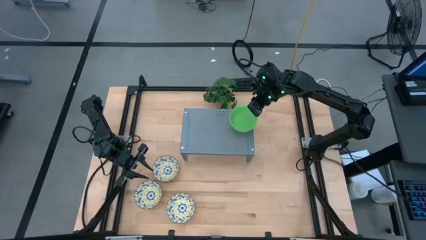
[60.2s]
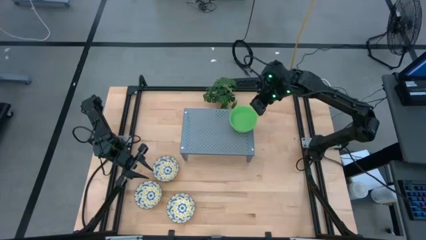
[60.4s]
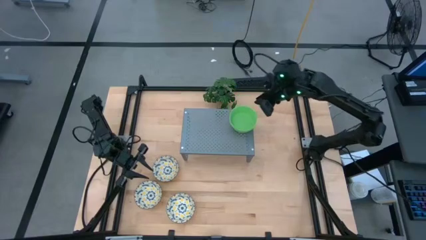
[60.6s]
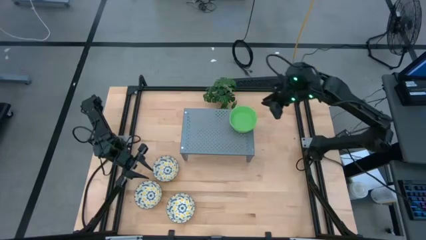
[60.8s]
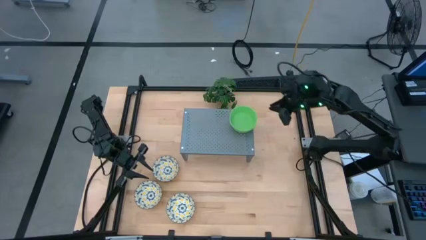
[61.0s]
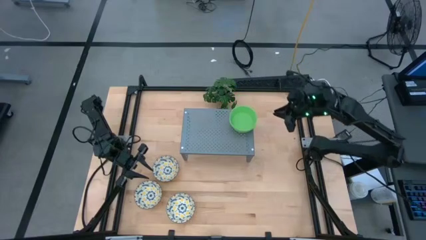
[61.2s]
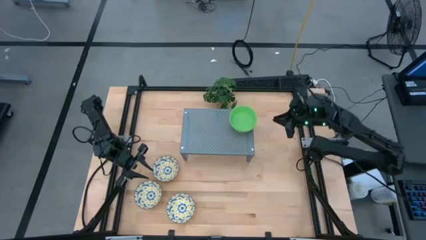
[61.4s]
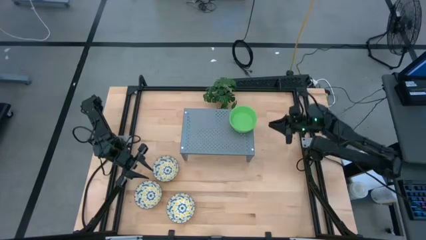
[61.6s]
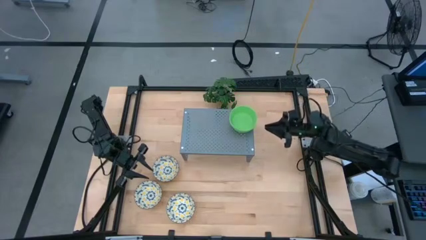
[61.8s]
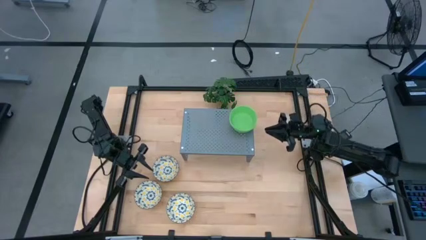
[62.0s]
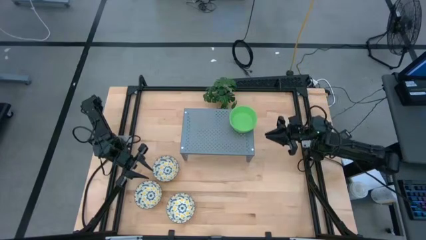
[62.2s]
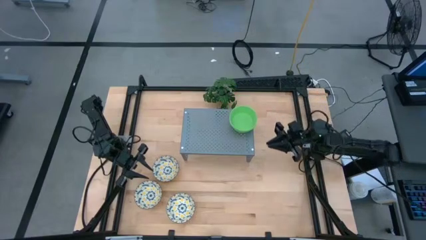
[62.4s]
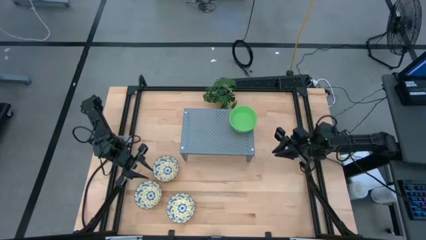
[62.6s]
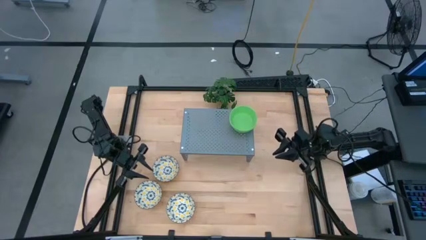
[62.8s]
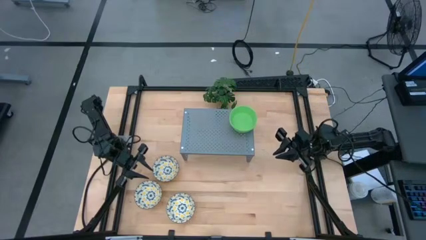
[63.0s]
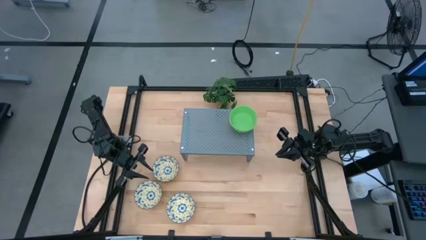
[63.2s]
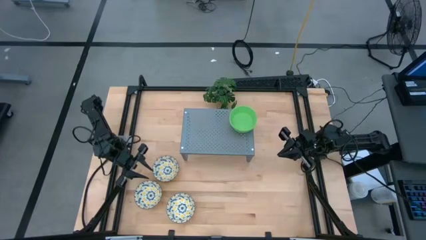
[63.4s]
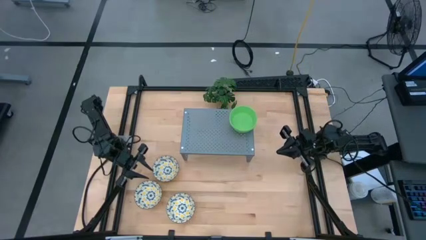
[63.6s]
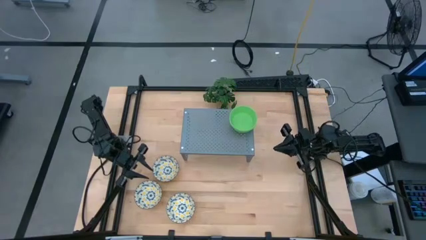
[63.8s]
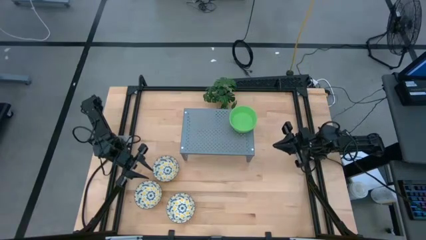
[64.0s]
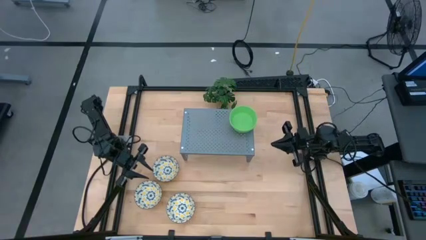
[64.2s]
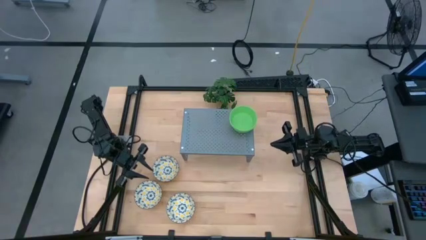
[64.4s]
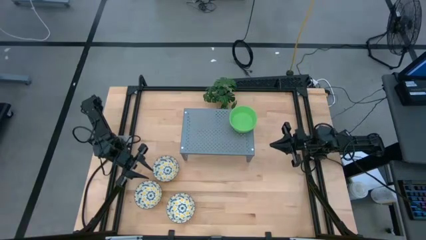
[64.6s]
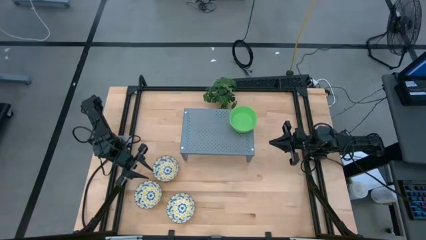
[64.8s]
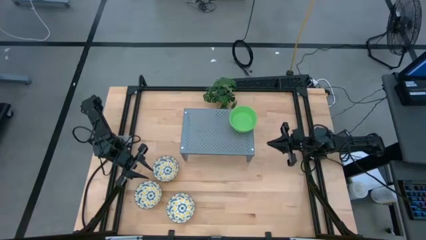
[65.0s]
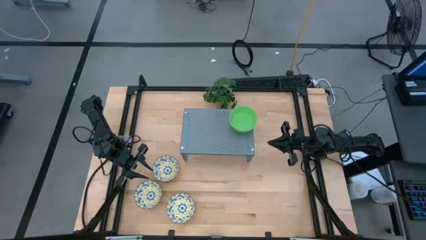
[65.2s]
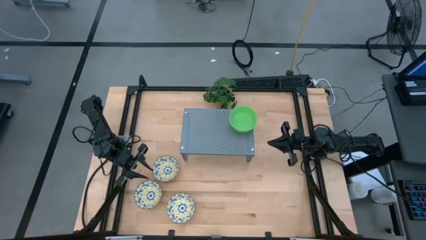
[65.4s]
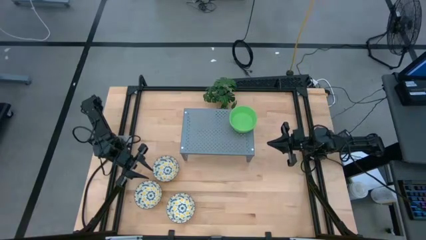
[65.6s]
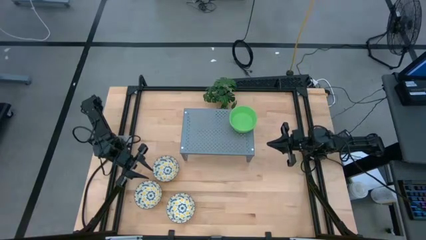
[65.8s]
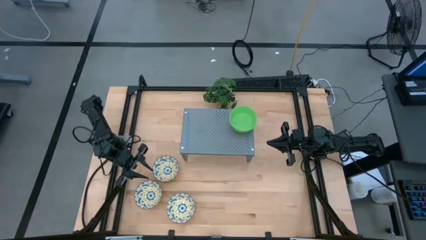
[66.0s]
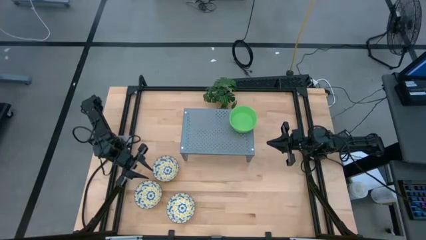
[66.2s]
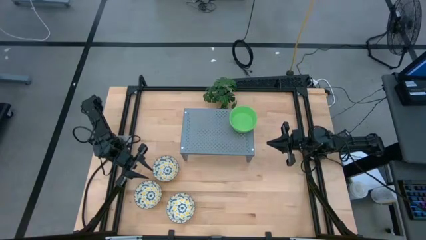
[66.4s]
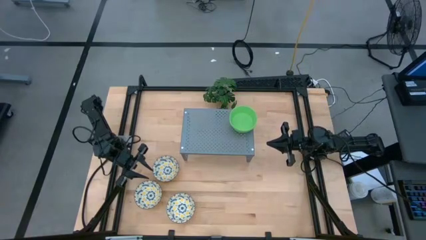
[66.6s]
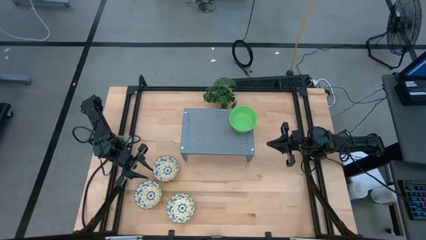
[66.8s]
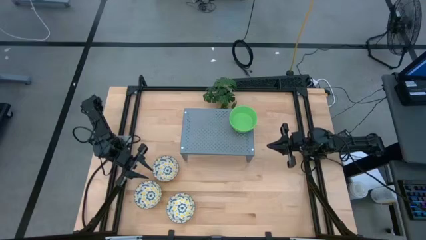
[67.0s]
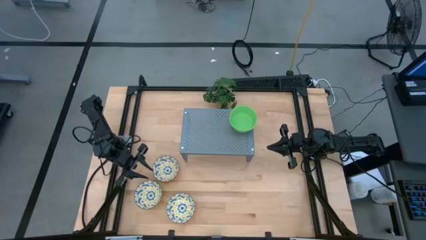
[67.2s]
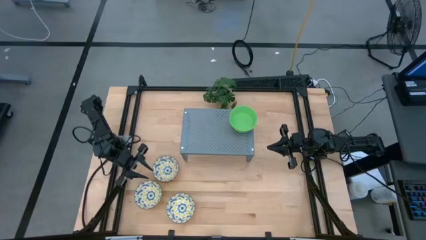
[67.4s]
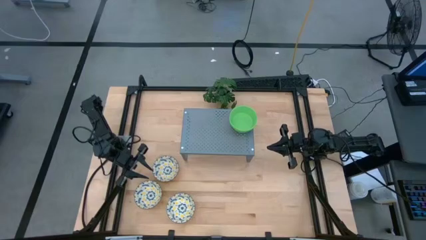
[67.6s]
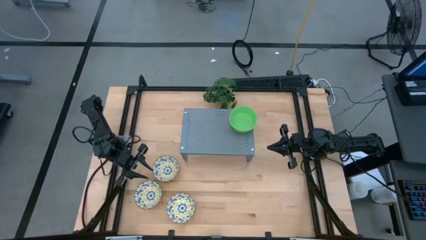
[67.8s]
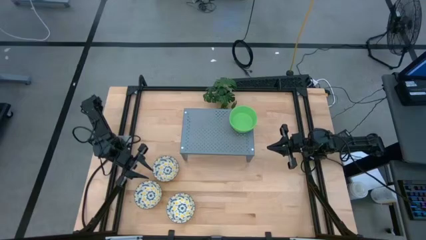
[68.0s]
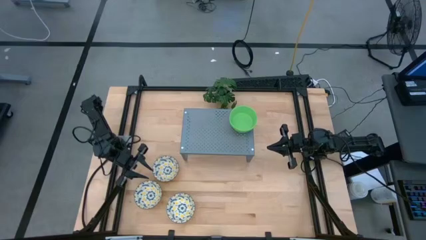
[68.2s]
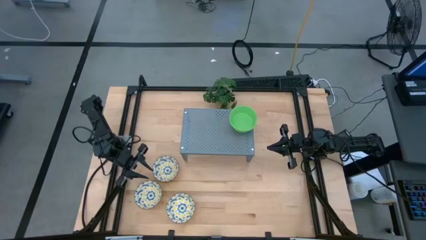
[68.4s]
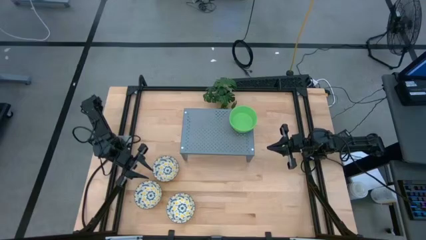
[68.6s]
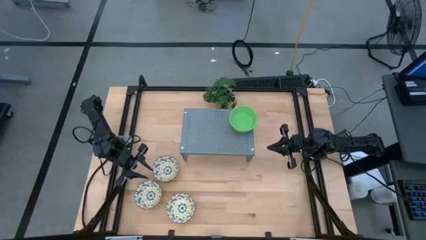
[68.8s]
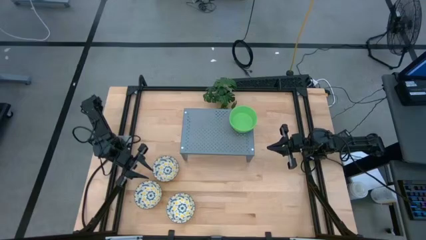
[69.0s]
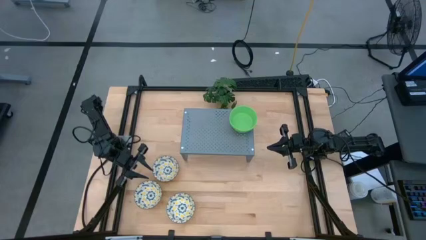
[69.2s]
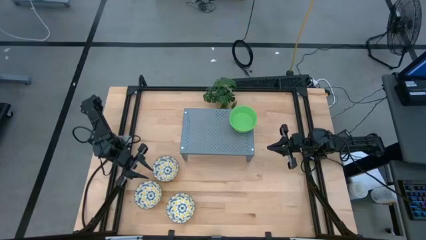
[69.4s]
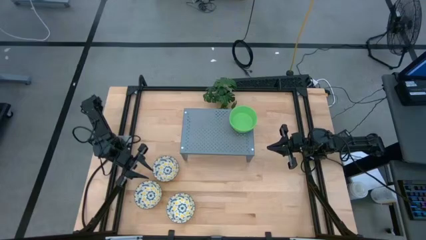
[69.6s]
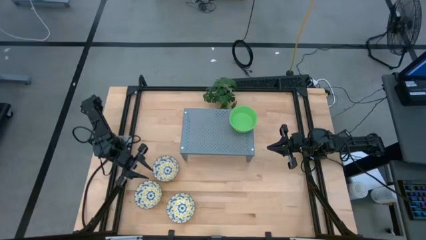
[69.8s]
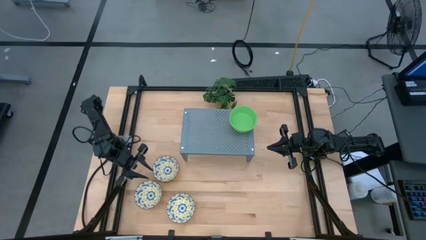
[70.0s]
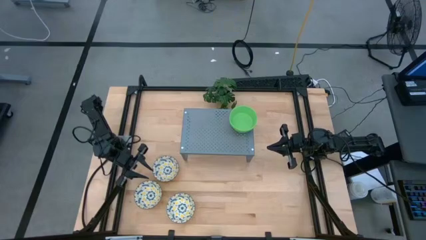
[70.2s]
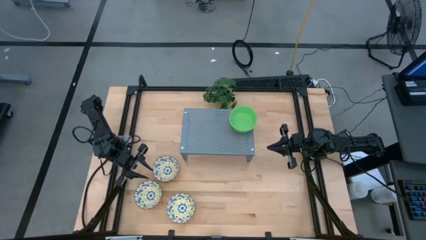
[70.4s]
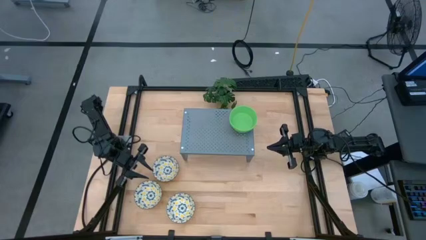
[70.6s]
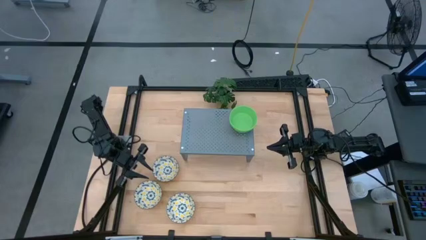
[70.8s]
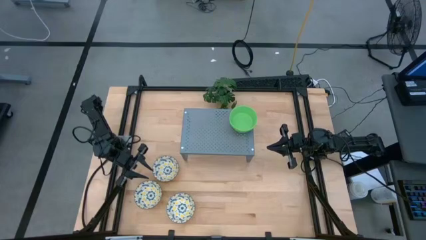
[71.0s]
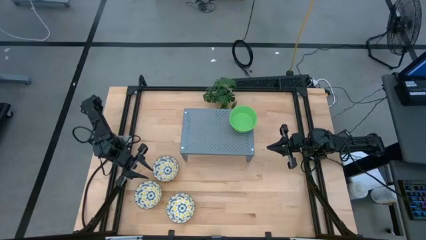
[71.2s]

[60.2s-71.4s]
Task: Pick & Place Mini bowls
Put the top yellow bowl on the shelf

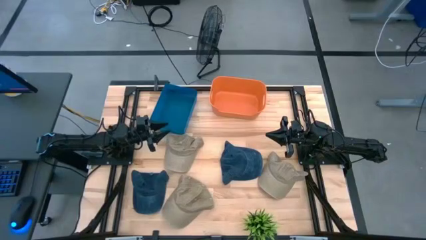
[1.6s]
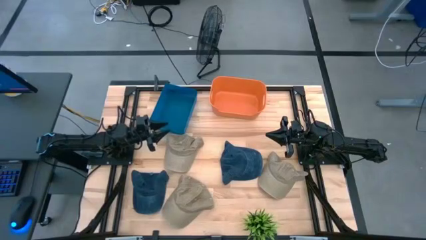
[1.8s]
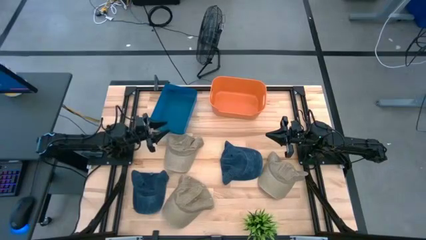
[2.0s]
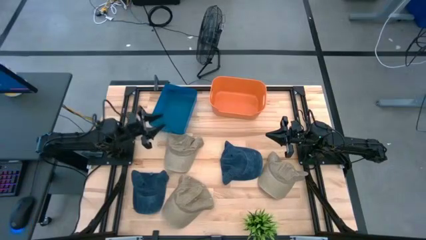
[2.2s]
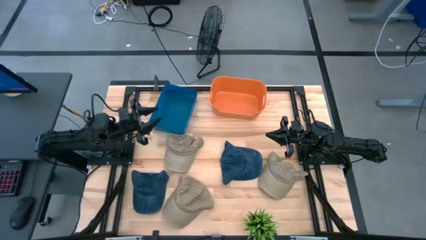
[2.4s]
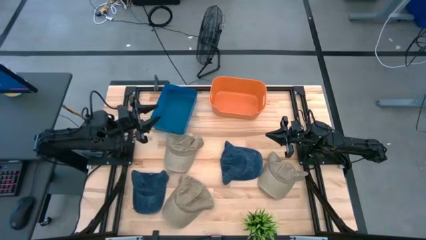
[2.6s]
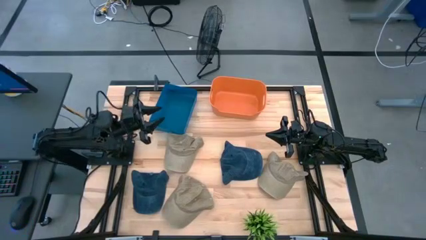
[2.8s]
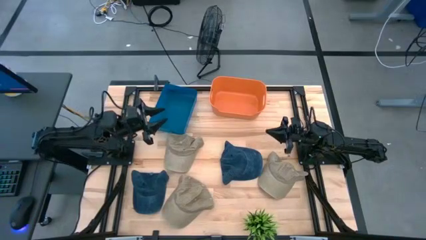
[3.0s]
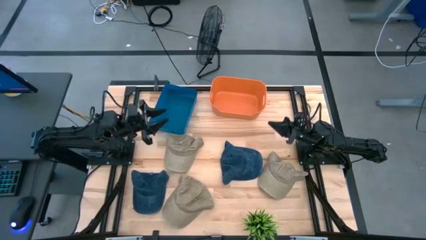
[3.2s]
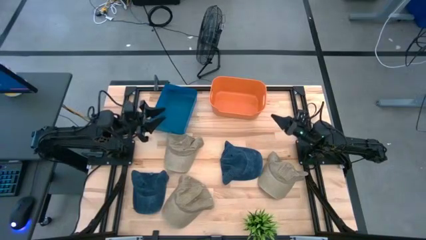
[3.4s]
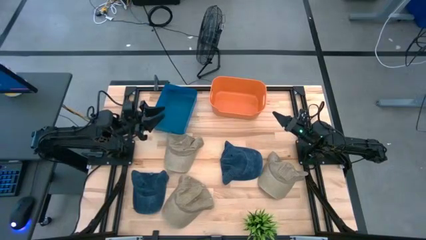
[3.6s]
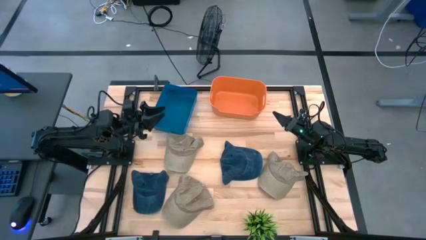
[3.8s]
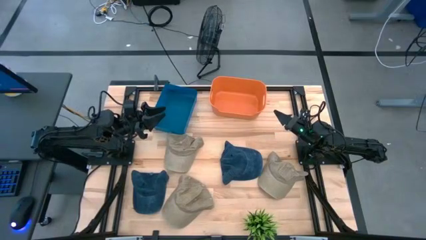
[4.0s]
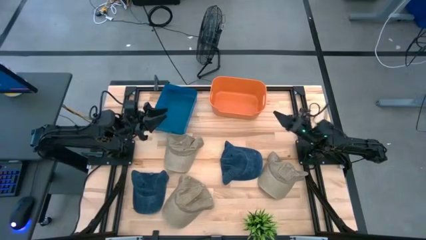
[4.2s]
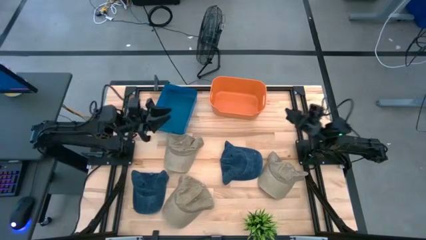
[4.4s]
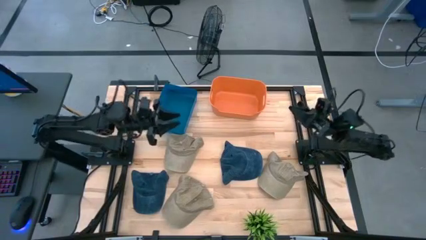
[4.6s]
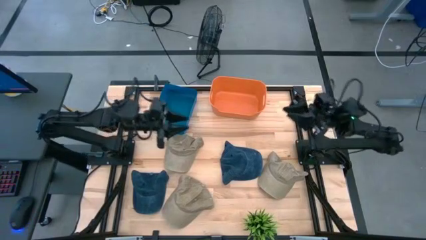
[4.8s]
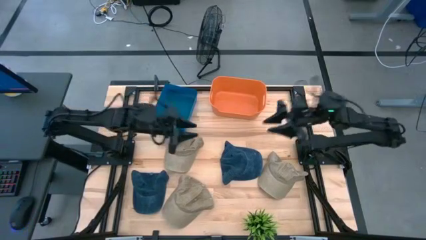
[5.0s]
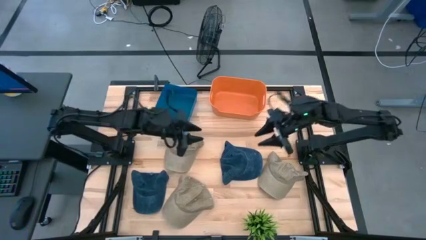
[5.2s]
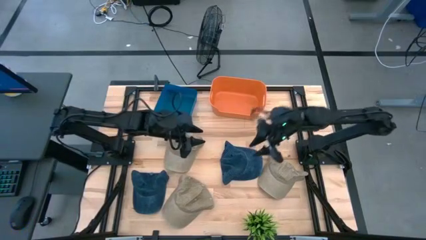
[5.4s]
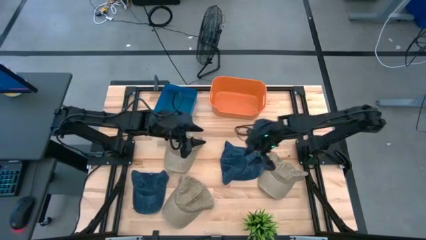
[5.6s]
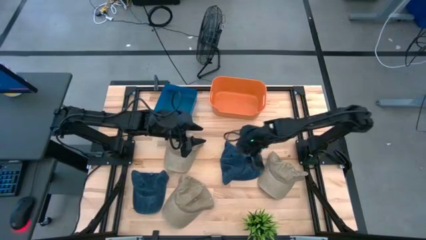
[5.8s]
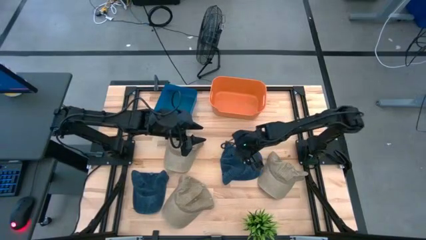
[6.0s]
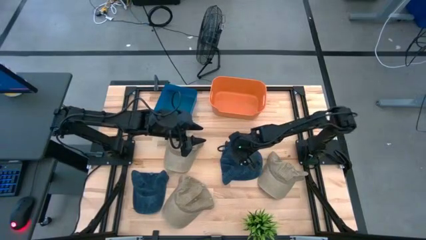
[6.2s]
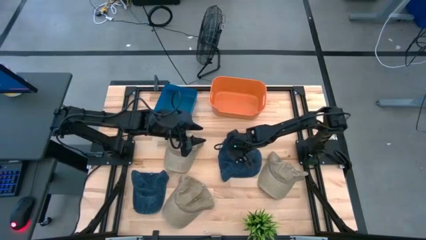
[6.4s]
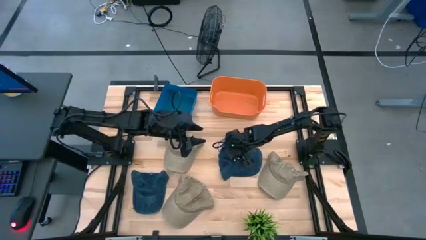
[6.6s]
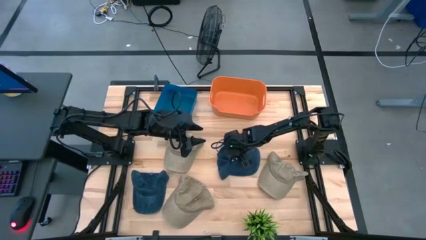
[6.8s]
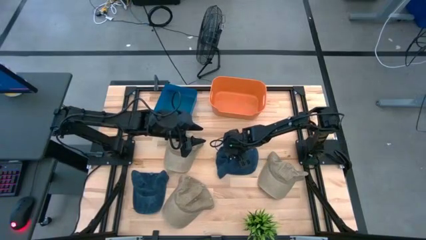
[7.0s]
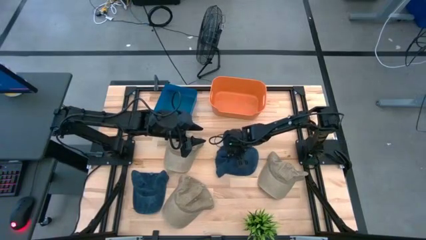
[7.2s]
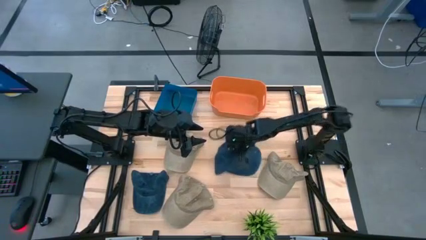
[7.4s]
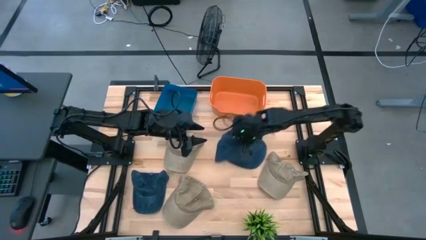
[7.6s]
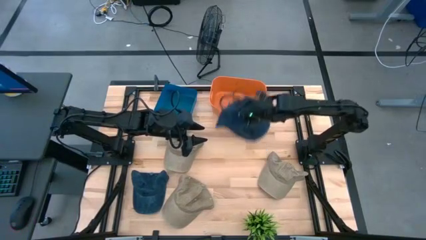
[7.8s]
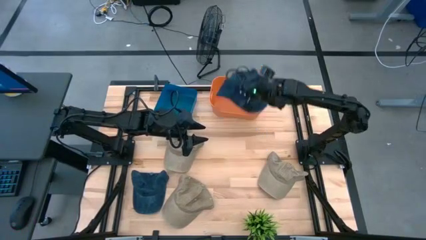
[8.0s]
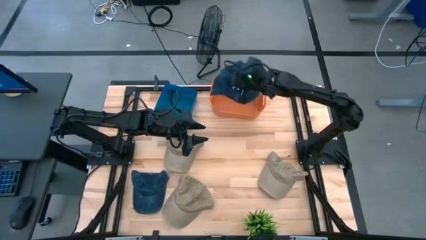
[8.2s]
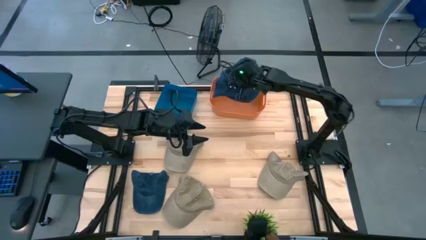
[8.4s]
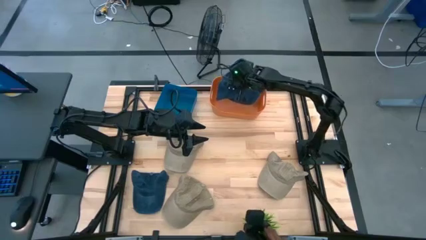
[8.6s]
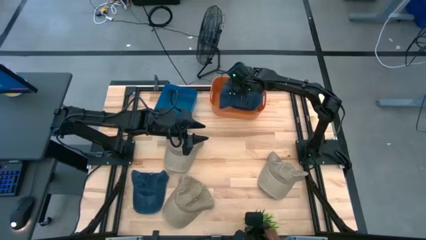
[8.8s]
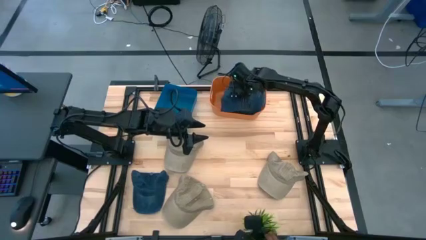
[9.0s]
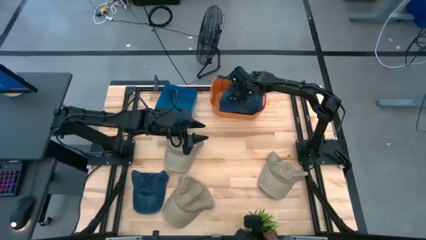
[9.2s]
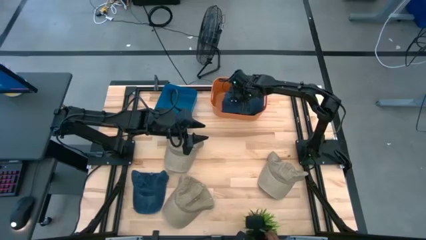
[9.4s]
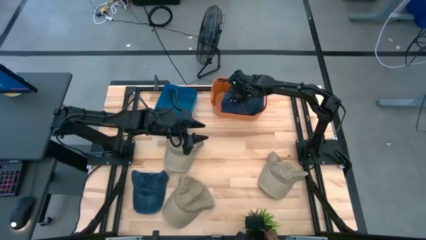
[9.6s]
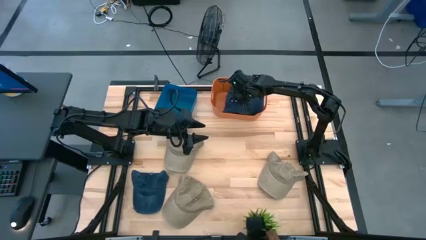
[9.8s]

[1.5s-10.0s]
Task: Pick & Place hat
Put the right blue cap into the orange bin
